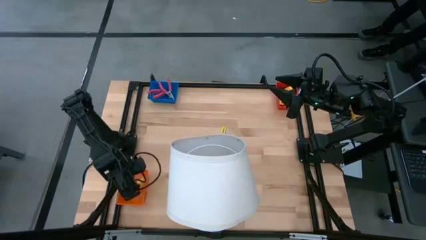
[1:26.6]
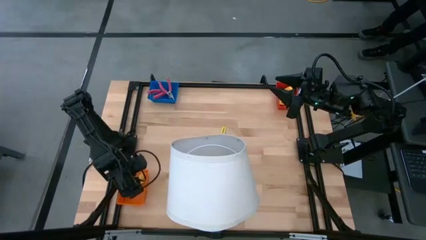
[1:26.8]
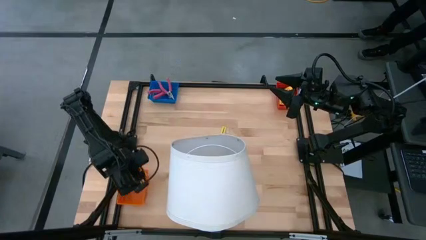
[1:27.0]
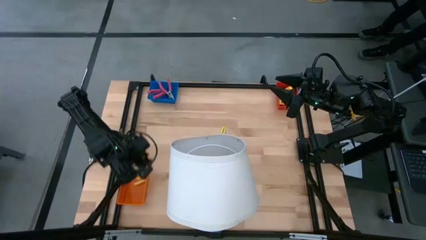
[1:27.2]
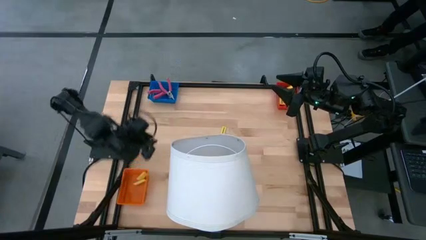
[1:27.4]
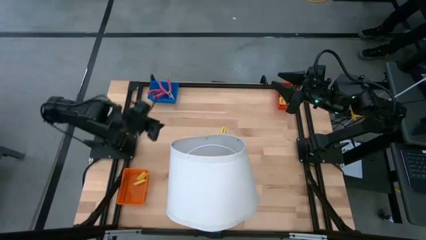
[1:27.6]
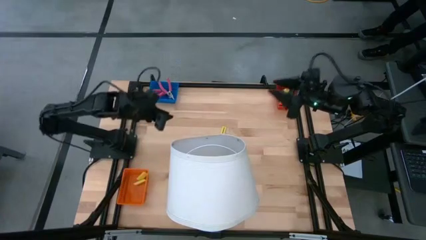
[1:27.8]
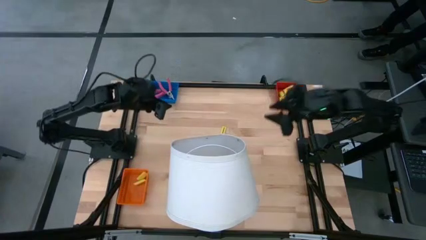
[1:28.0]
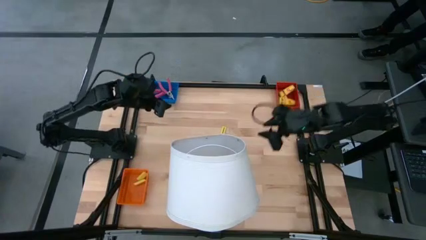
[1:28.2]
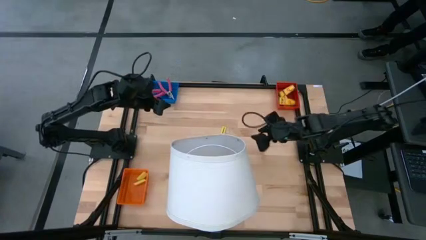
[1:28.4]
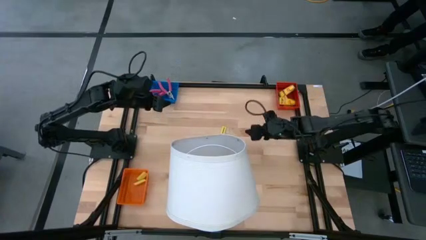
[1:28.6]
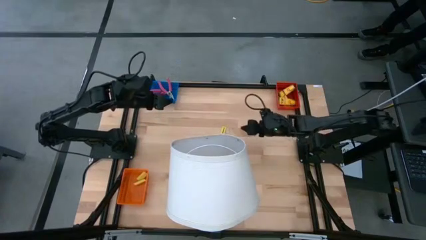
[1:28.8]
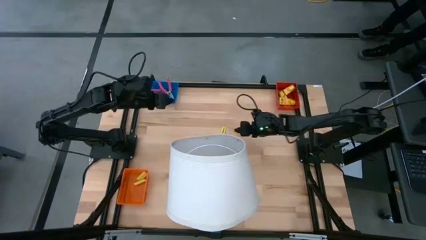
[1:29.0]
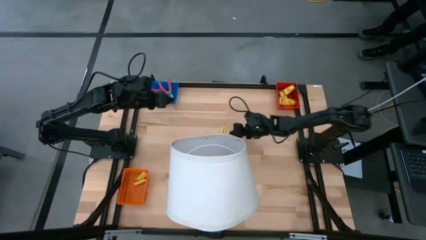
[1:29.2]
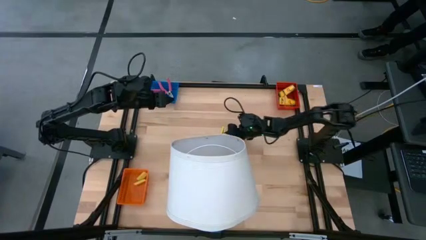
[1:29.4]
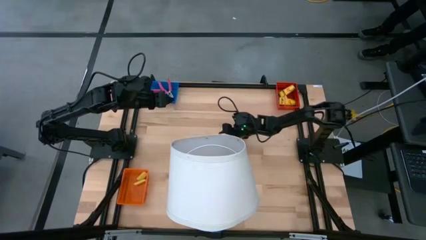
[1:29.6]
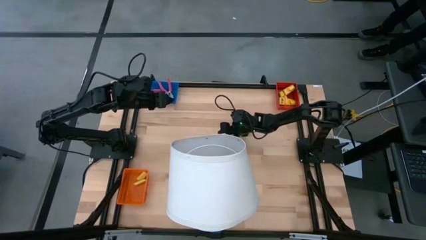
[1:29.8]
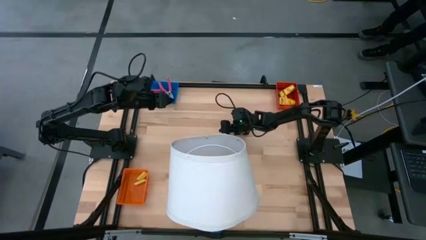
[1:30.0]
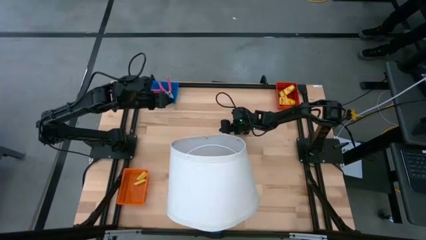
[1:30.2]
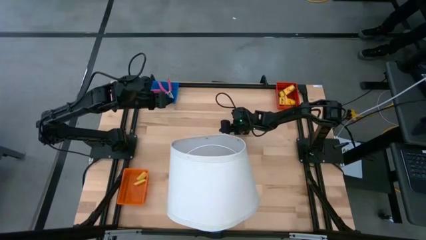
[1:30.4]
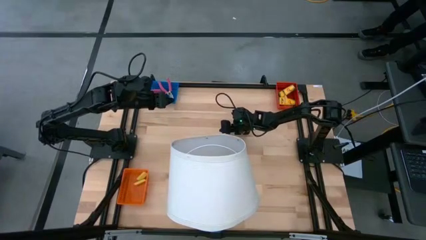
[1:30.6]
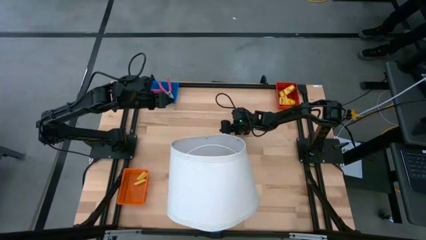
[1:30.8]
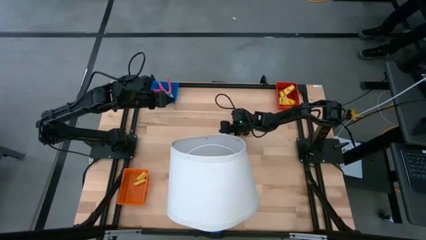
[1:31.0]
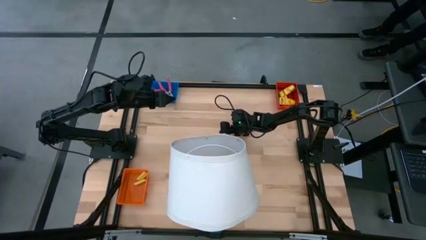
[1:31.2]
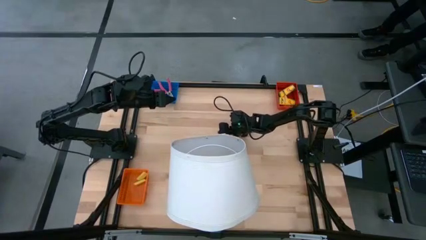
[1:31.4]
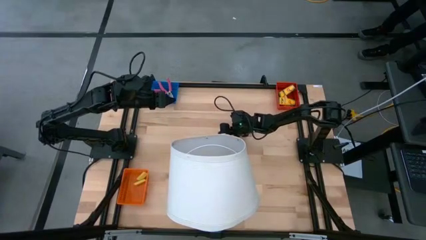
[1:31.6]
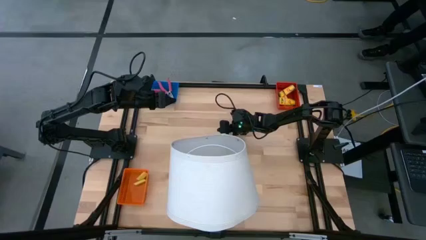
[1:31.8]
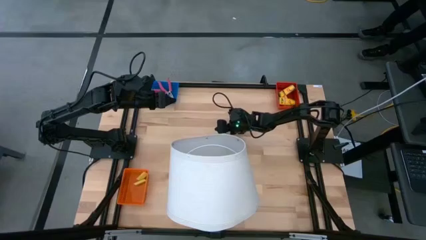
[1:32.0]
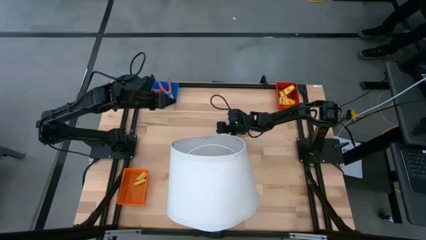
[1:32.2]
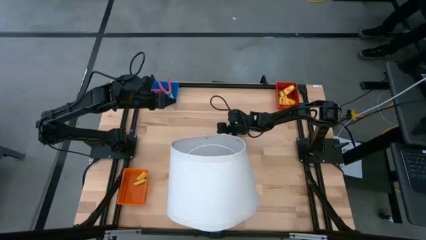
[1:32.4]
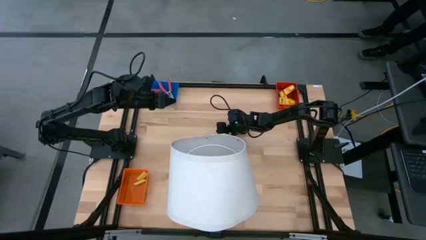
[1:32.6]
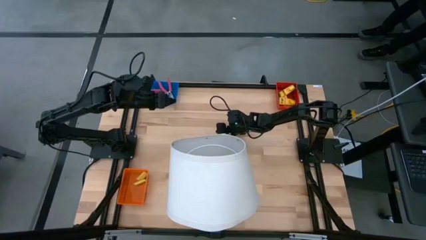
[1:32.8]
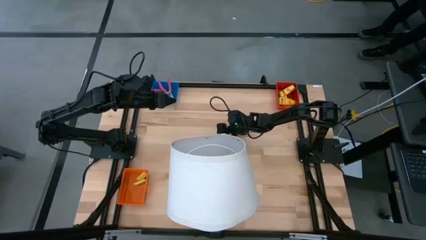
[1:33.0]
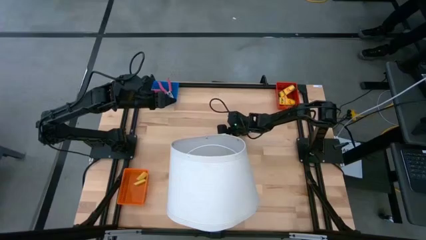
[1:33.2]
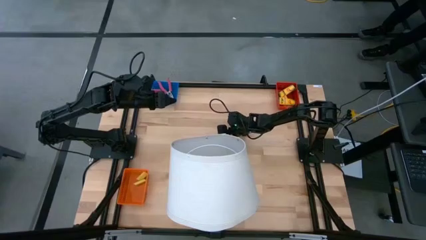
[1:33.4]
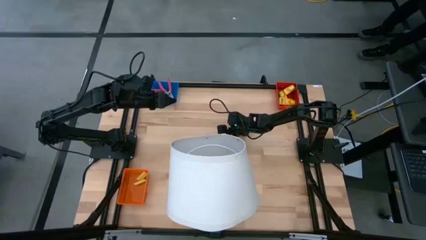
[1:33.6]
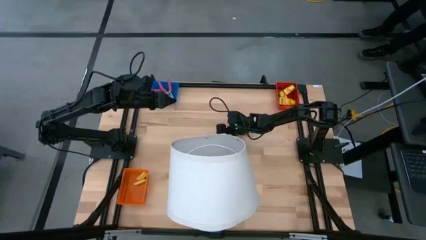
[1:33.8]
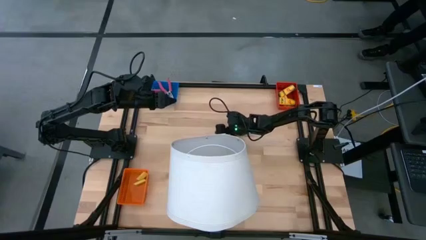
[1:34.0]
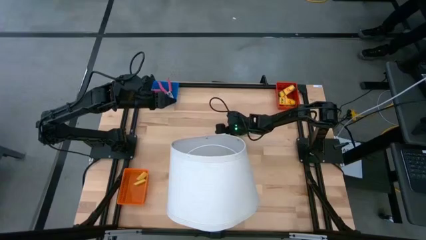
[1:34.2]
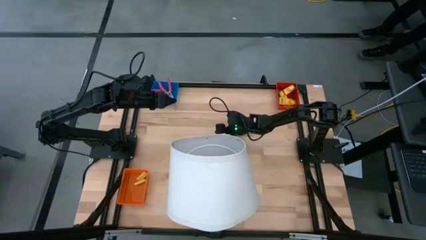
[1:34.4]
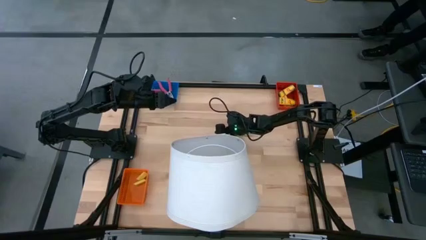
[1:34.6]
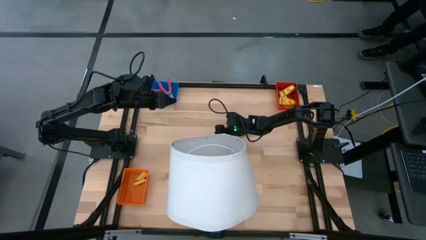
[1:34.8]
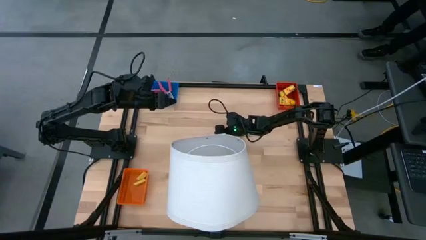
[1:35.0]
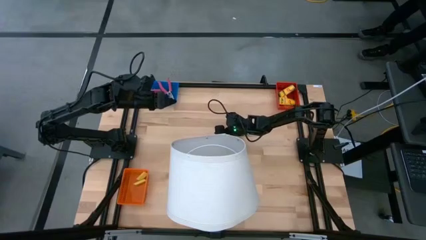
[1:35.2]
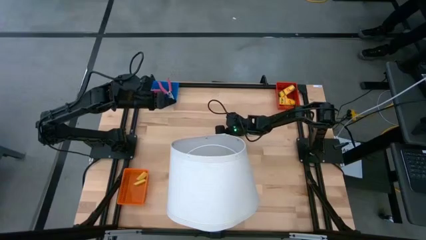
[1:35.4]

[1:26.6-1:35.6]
Task: Pick & Place School Supplies
Put the yellow eraser into the orange basket

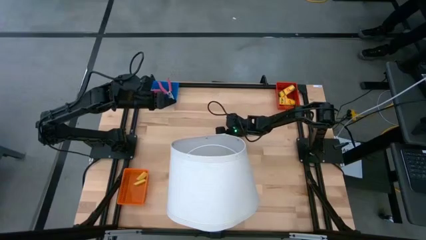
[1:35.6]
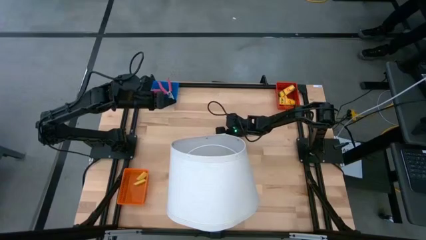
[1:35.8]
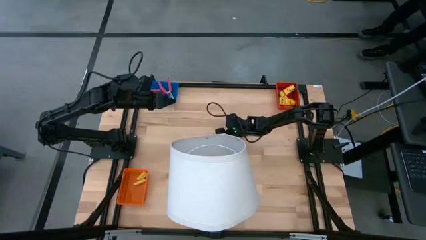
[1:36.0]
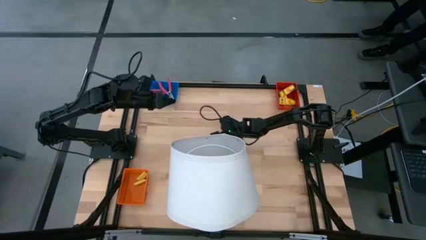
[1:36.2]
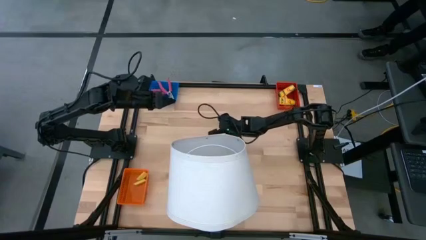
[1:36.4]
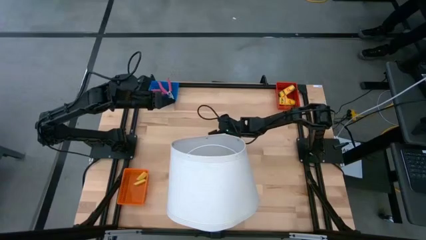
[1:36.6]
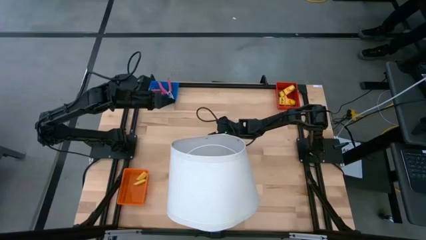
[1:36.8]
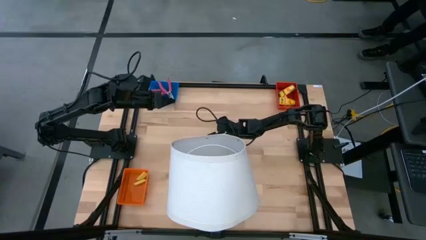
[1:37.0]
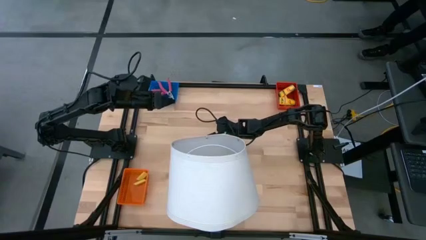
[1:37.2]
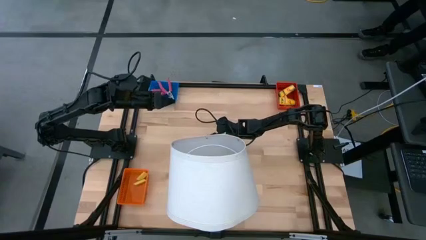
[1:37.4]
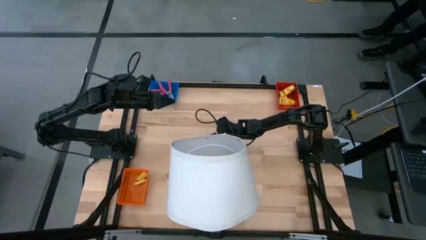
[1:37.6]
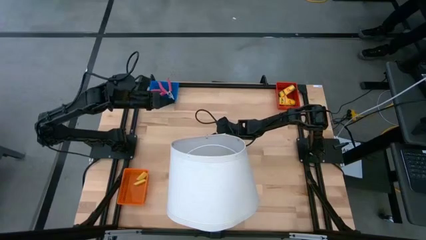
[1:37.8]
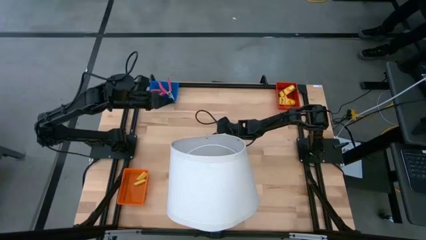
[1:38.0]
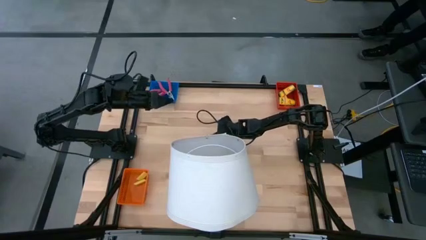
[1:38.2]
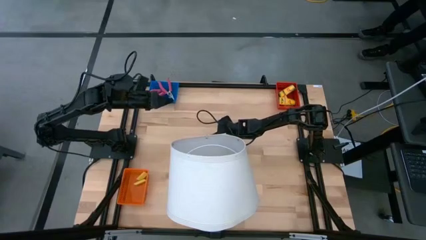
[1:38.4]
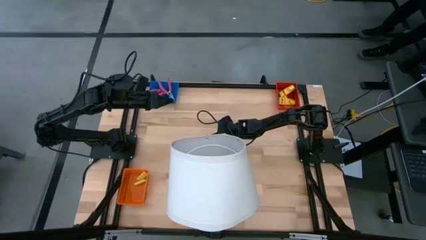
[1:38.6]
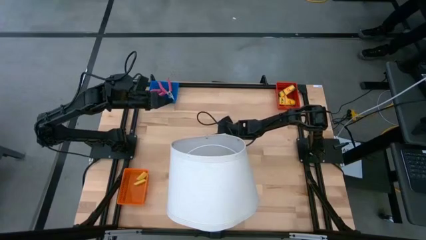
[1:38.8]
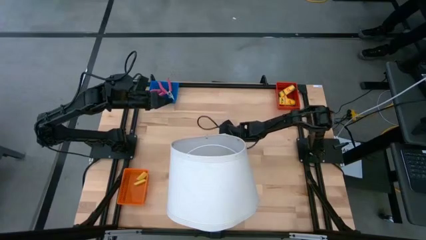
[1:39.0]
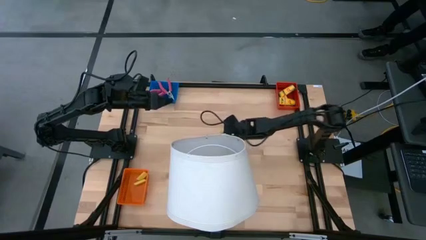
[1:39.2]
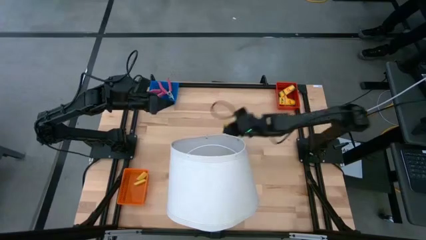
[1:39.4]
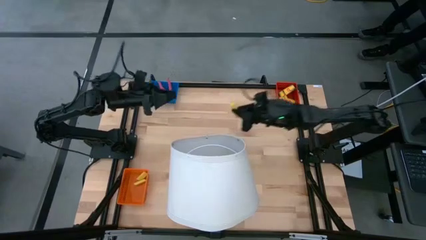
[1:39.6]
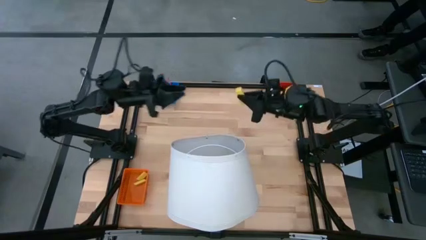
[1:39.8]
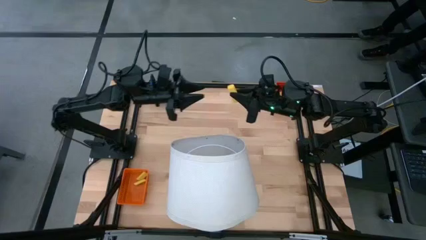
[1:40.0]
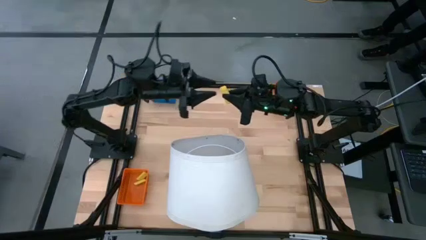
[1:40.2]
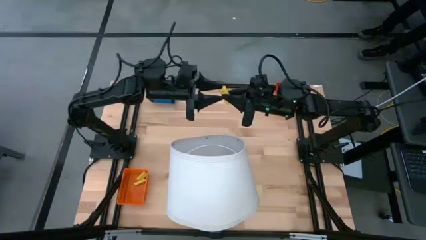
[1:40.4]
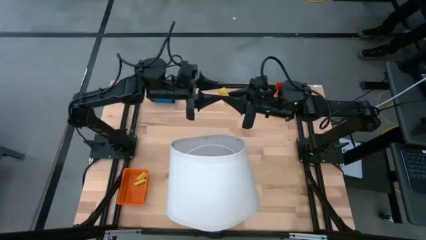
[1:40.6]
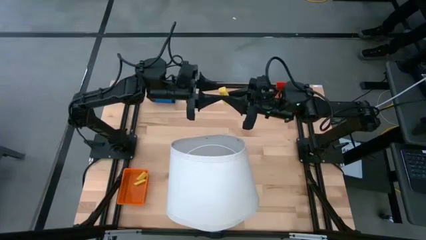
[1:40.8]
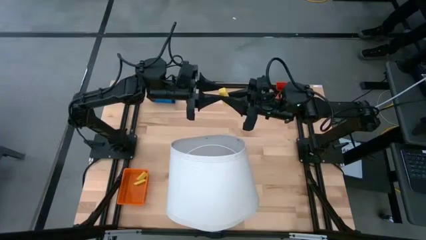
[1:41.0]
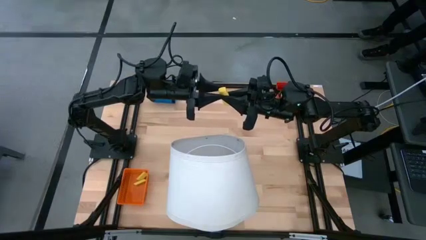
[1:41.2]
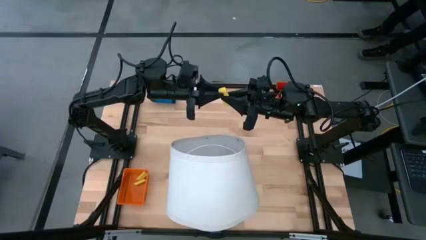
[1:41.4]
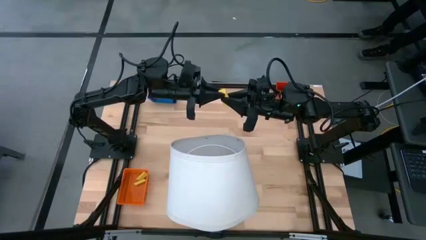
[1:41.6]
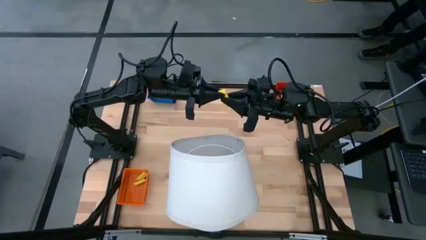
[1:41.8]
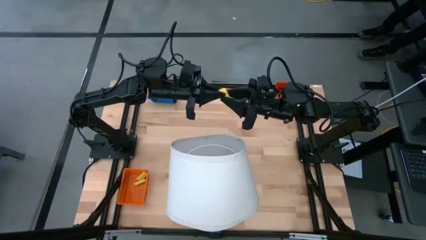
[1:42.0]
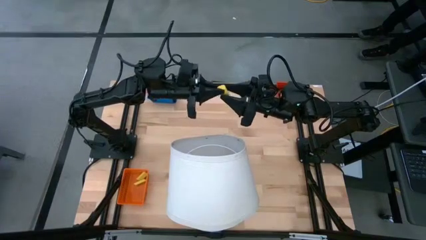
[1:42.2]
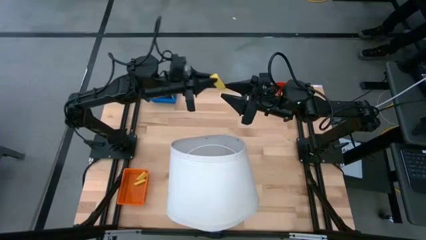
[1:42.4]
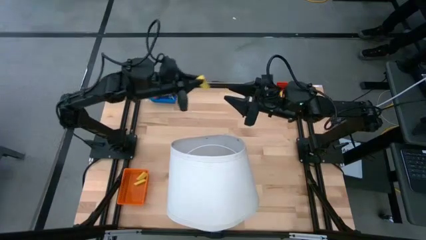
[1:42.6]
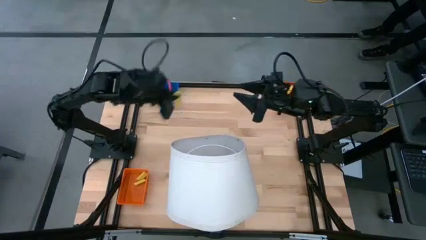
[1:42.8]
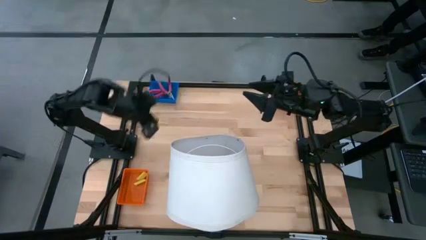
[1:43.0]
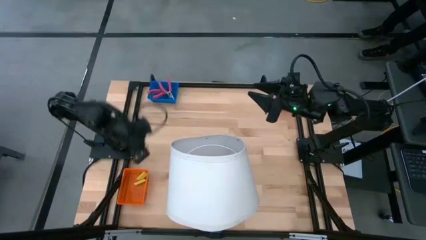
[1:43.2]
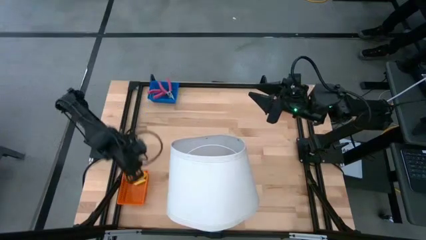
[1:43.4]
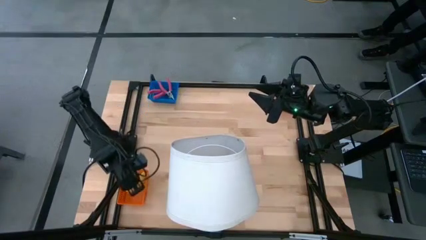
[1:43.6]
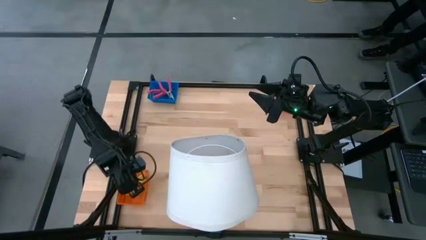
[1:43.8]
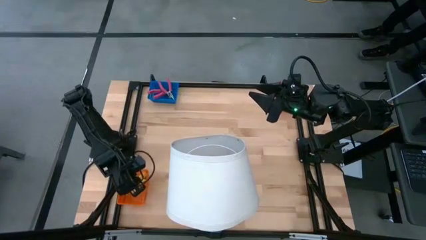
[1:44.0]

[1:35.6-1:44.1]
Put the yellow eraser into the orange basket
